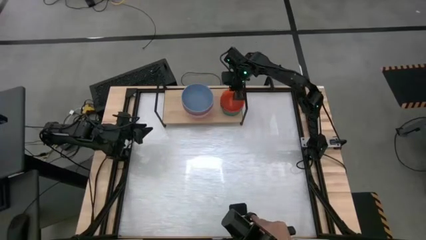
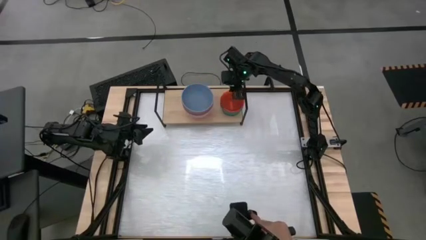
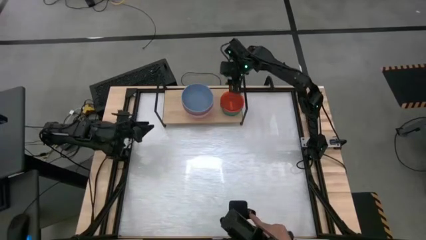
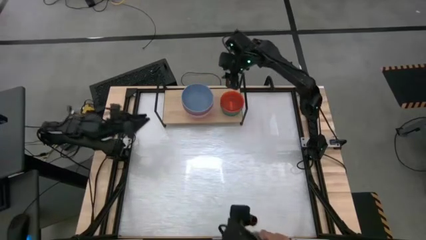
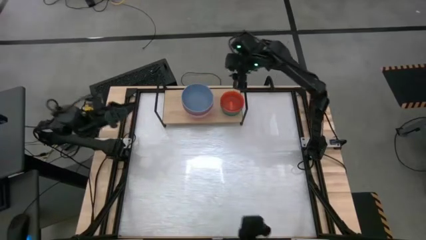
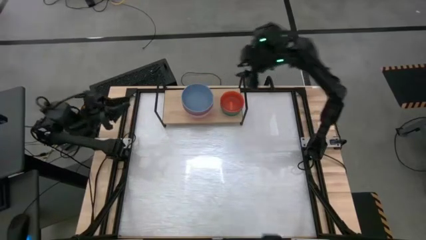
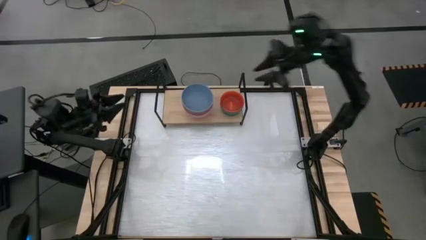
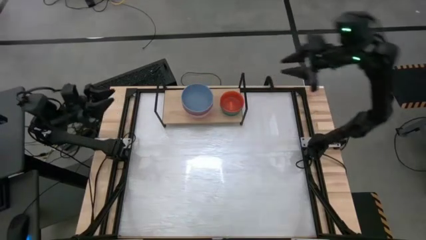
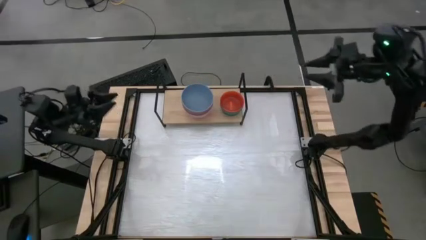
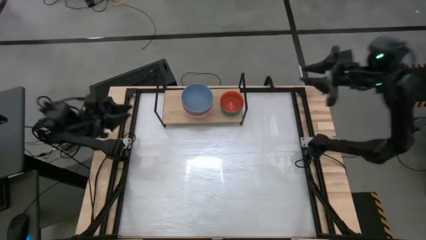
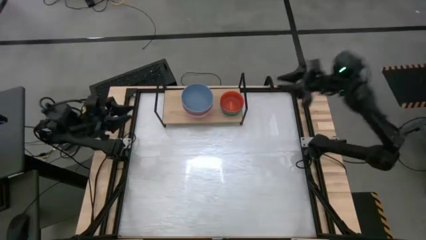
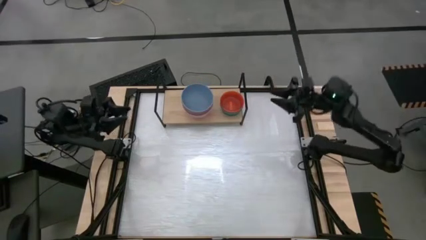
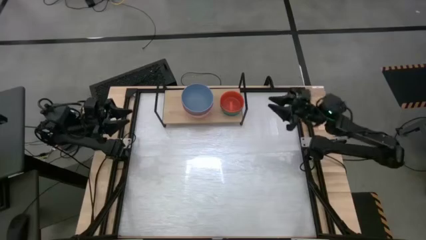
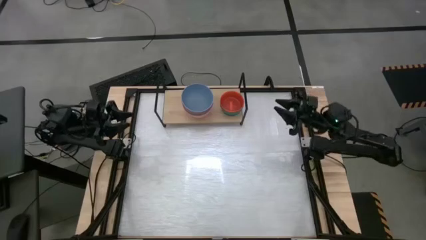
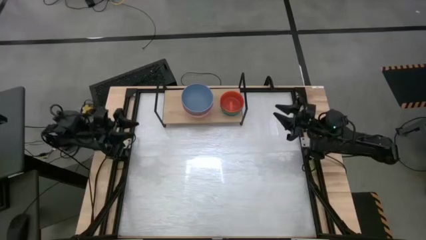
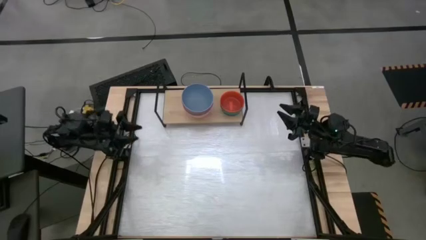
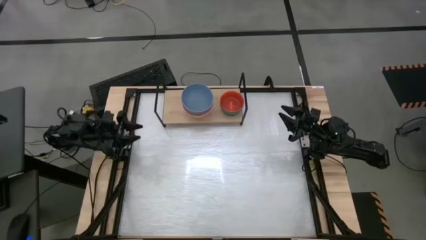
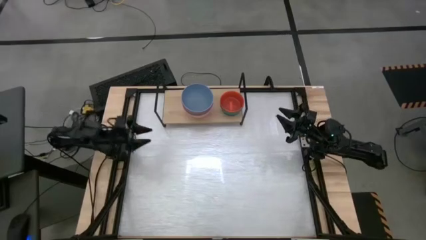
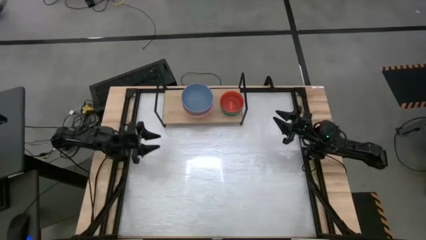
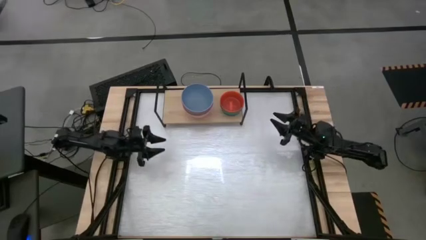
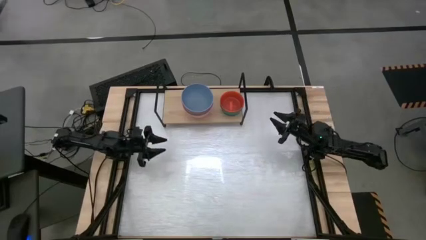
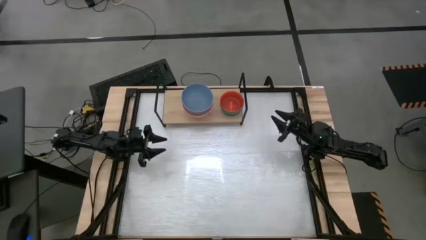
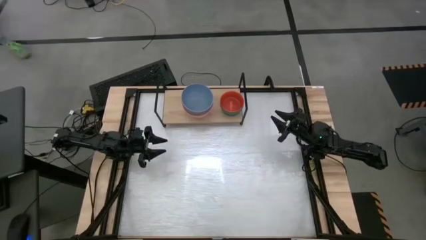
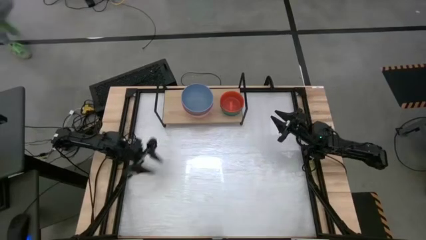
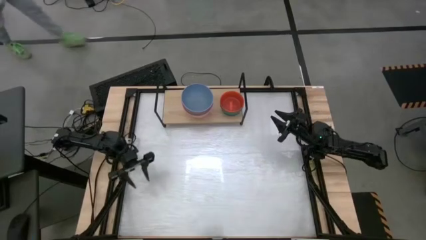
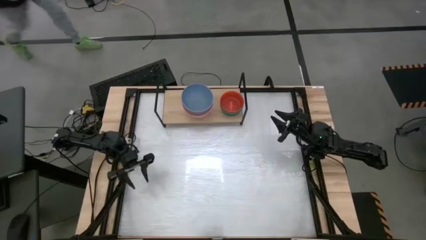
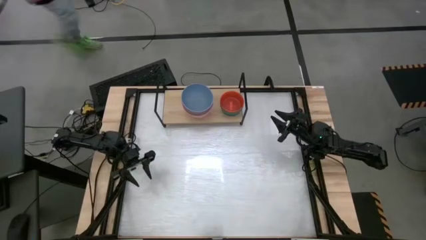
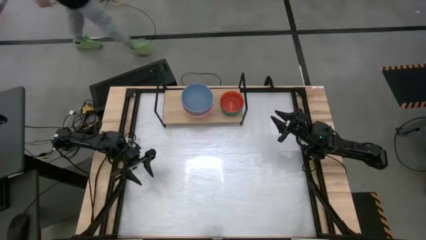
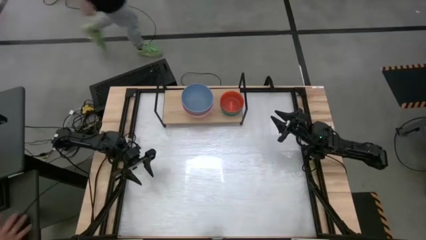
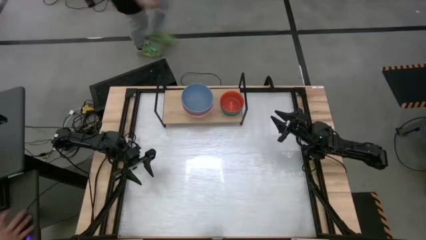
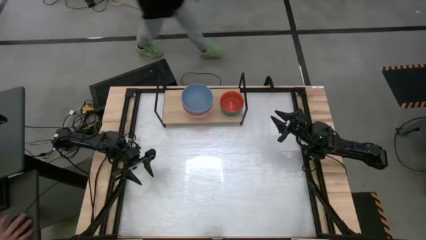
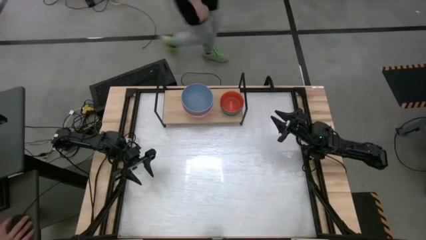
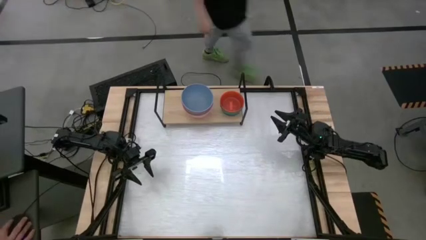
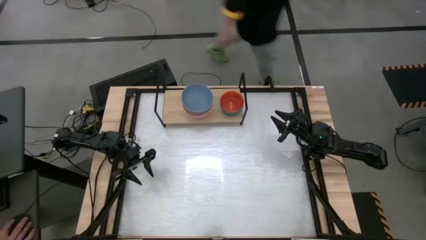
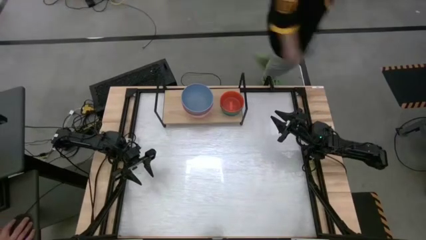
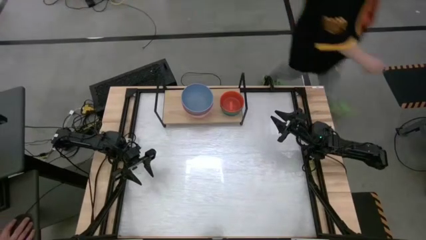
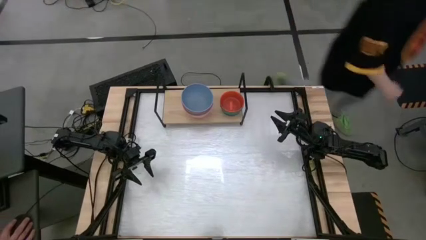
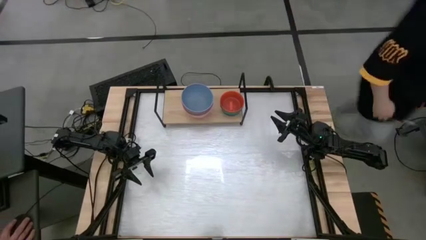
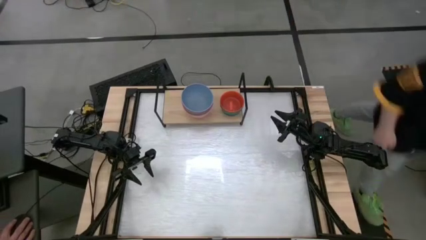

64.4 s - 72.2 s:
Task: Place and stack bowls onto a shelf
Return to Home Position

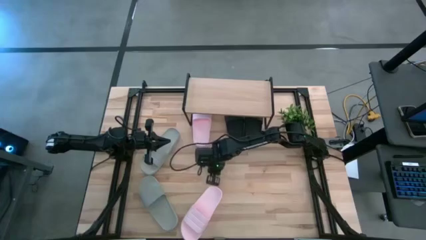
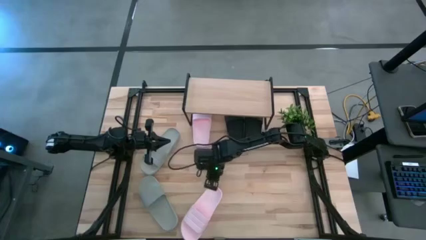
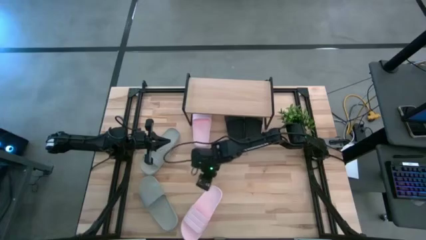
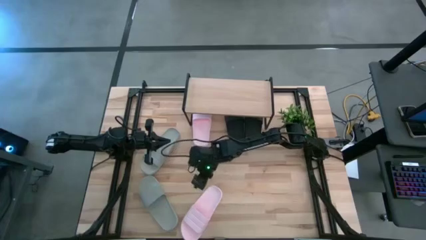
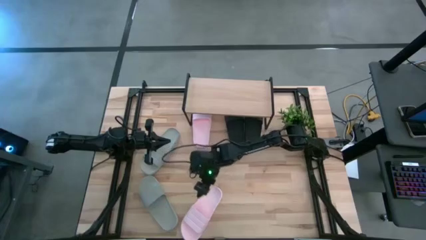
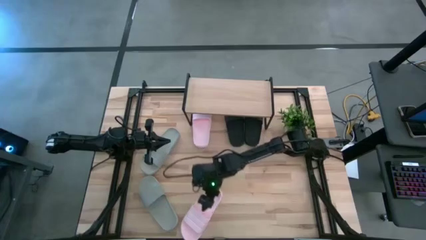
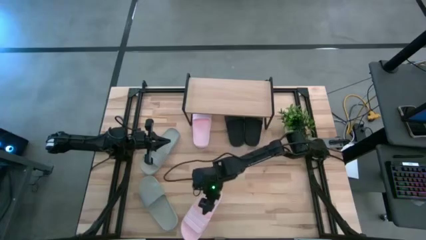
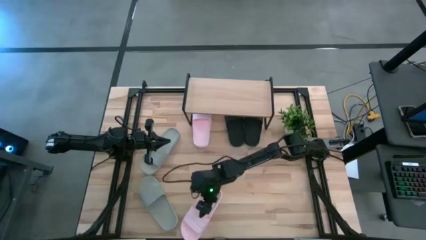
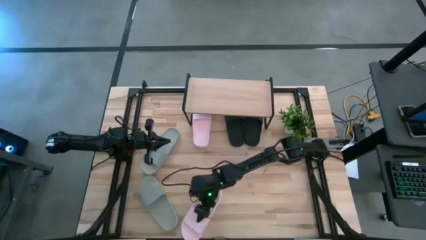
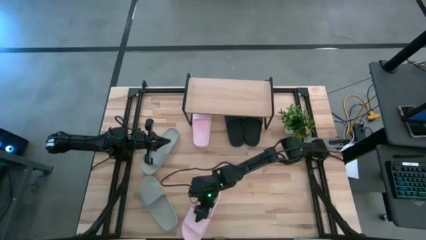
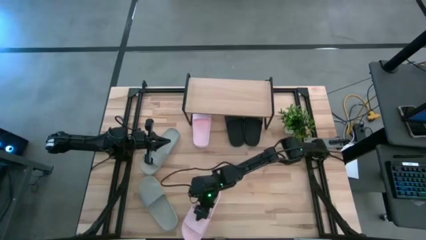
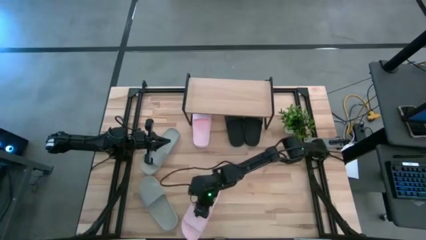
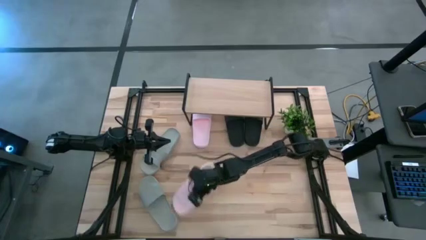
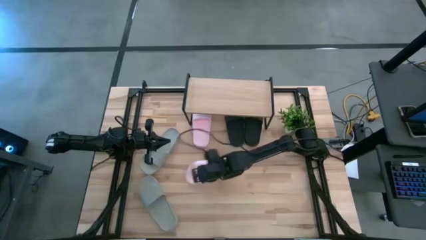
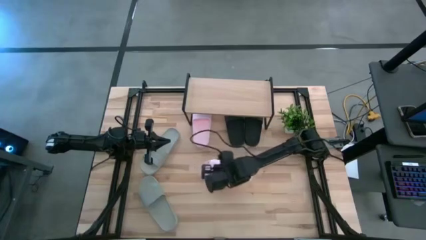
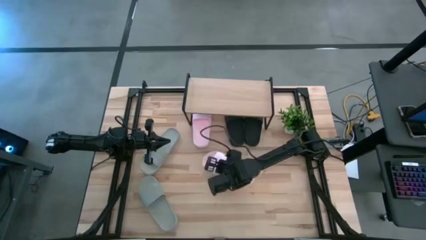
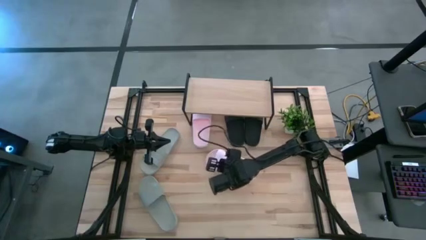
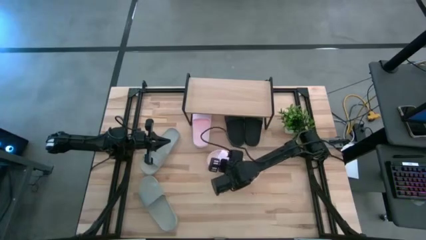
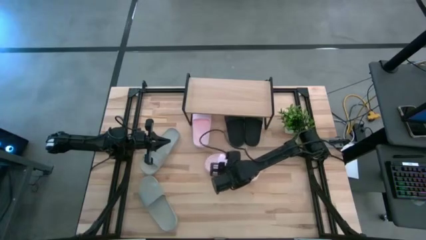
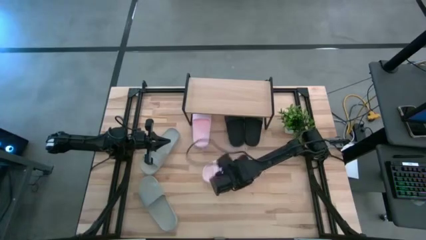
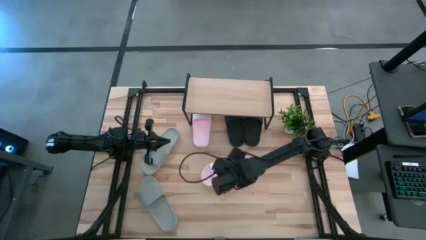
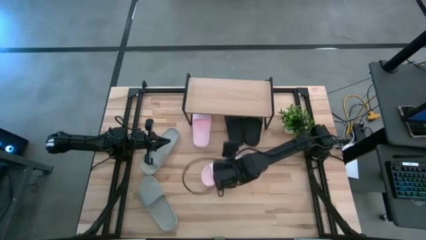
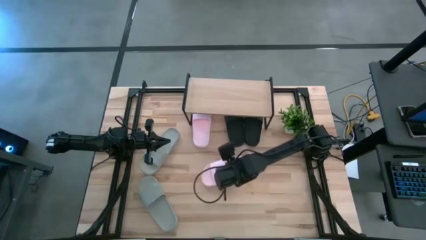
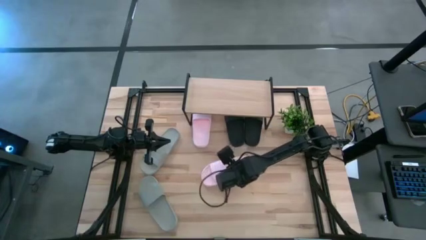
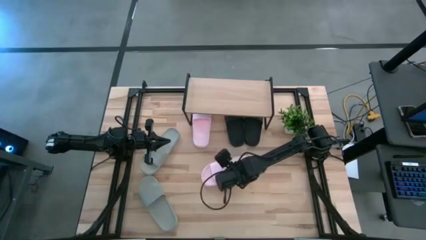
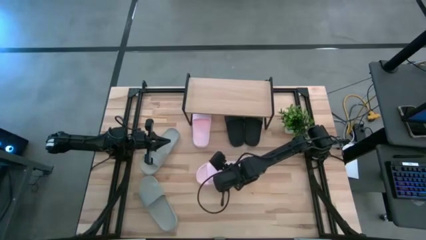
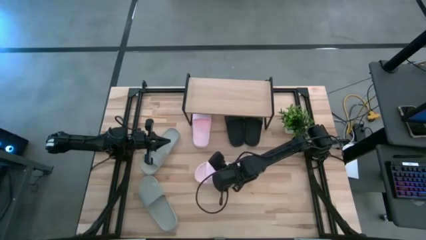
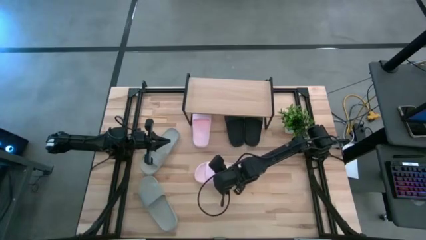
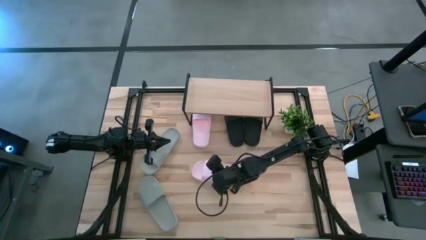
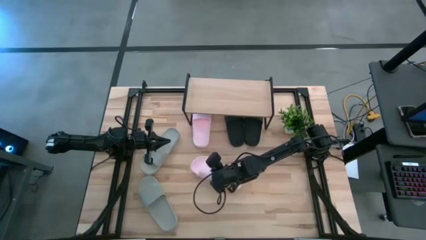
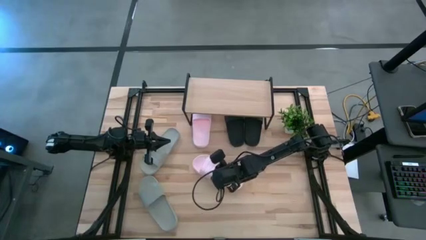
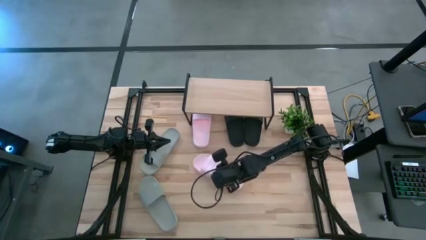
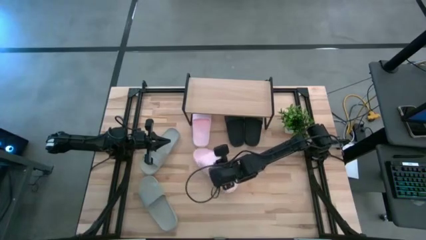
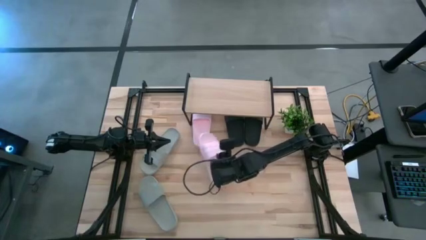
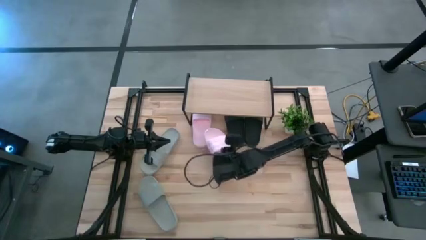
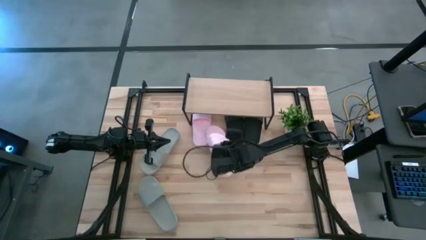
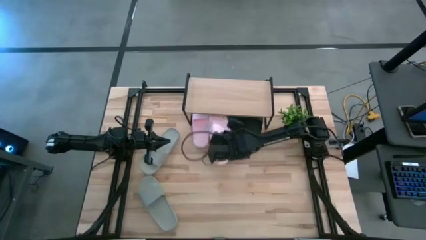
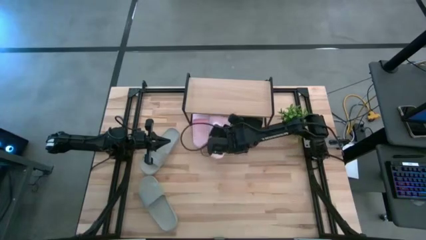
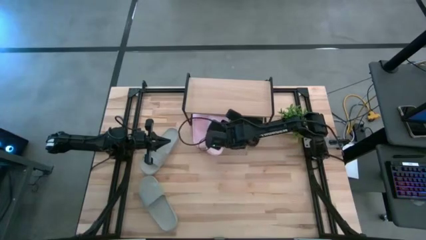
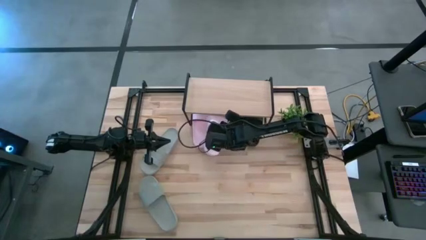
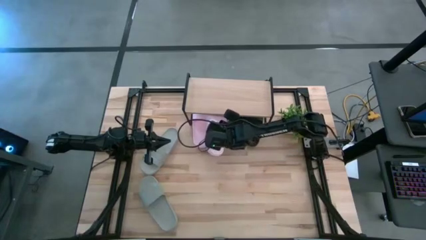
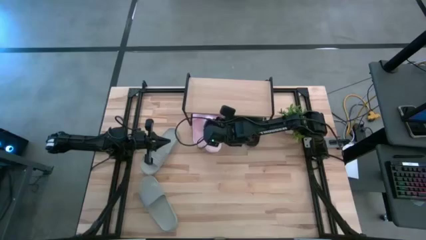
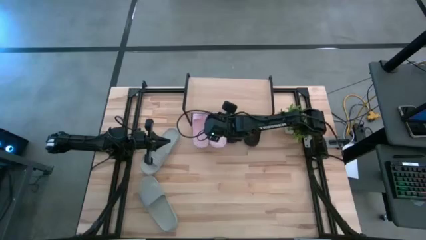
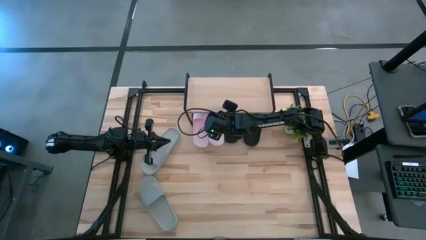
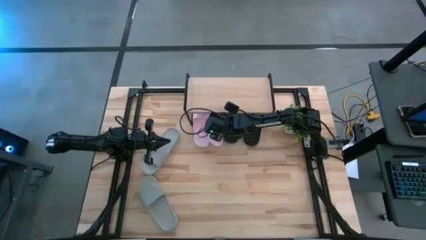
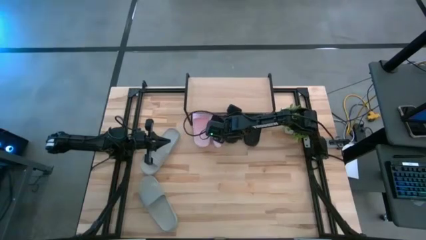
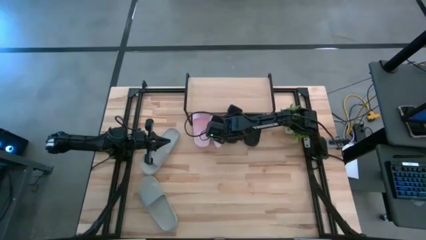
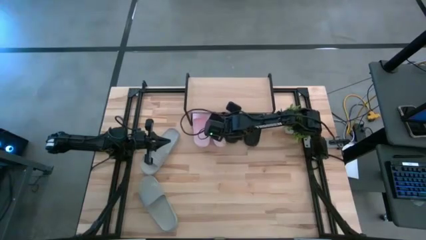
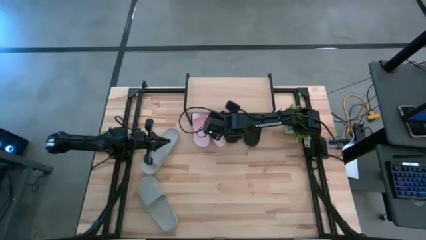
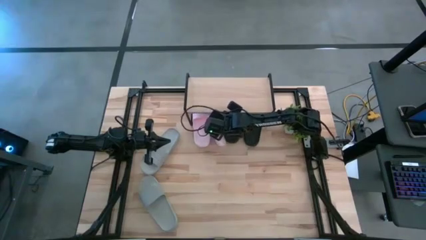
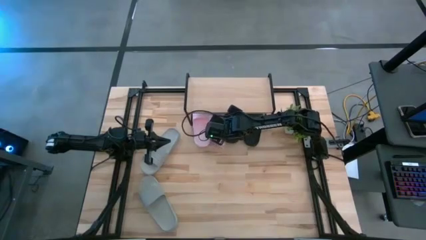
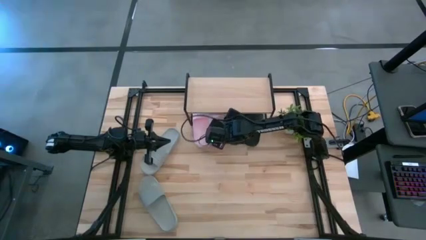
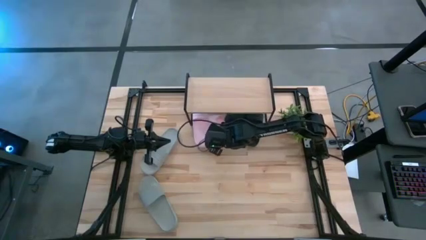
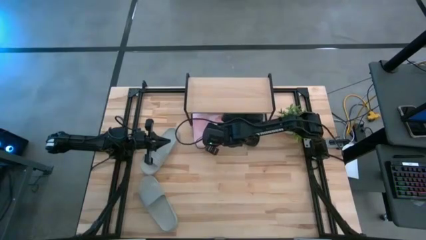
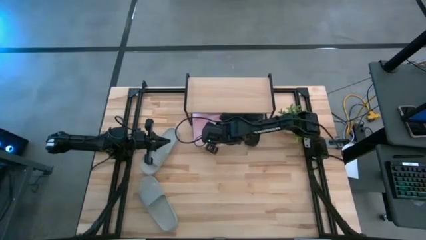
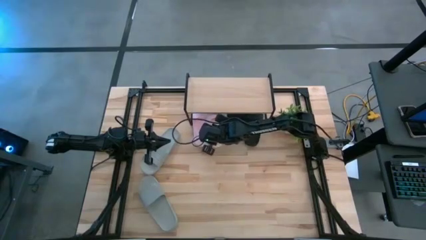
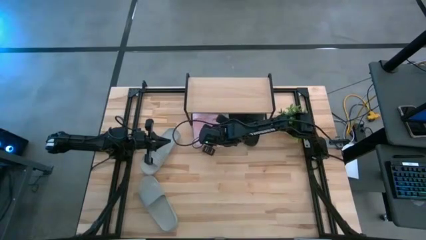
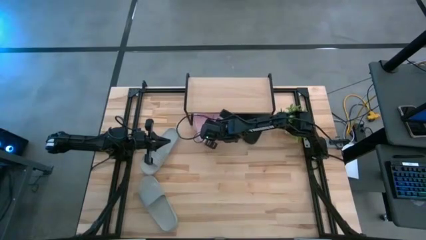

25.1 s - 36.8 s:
Task: Pick and place slides into the shelf
Put the right pink slide under the shelf
